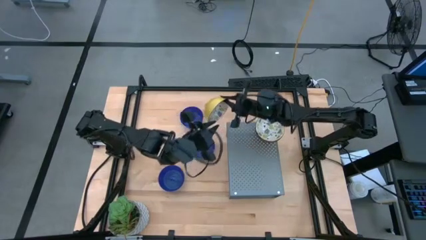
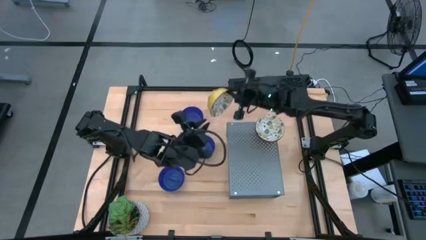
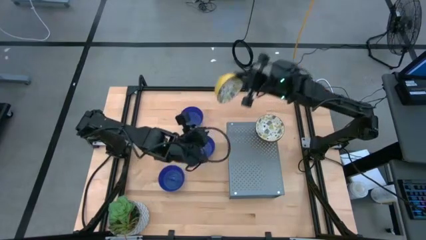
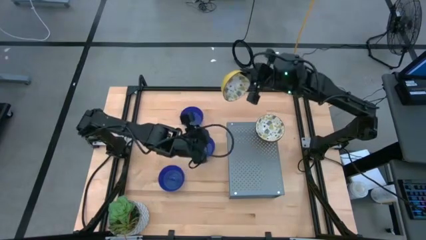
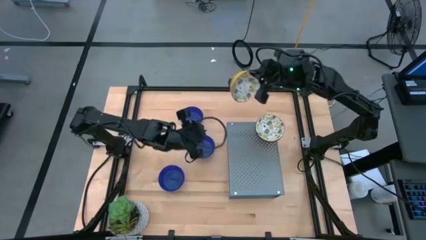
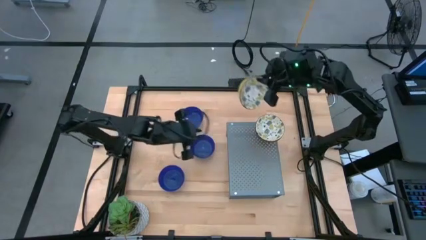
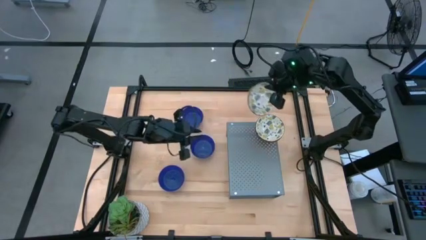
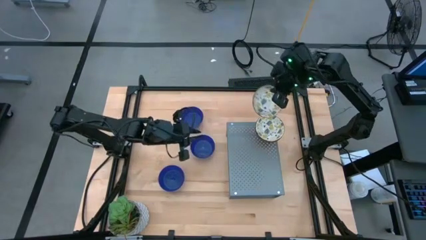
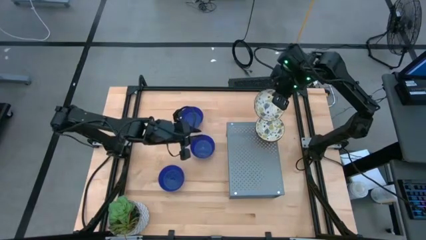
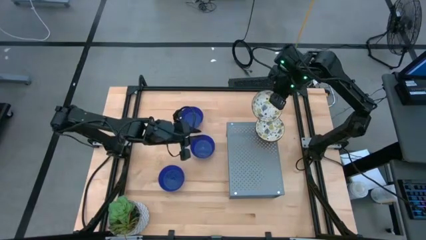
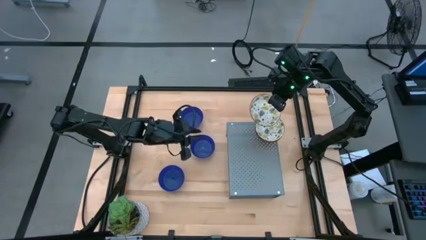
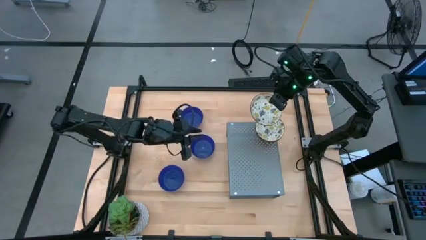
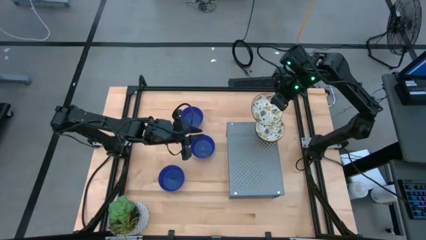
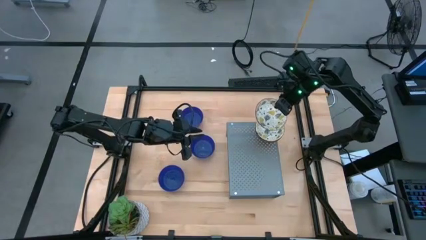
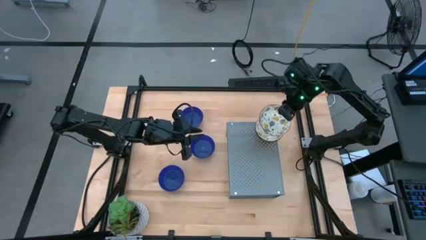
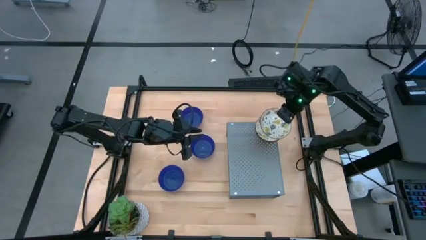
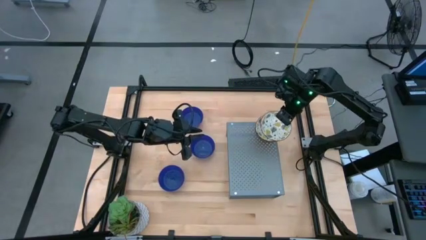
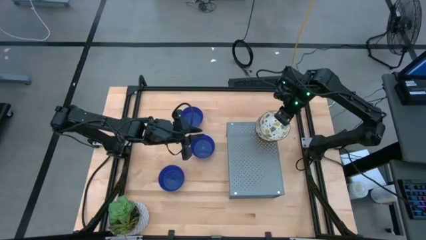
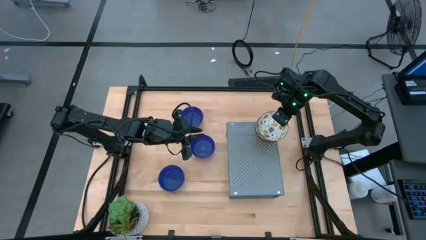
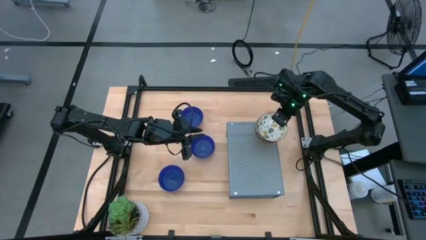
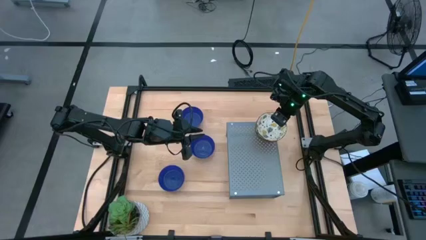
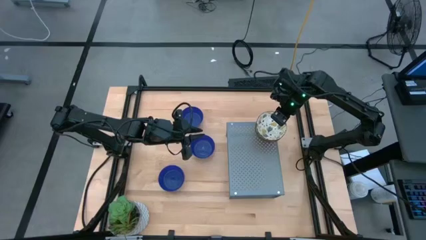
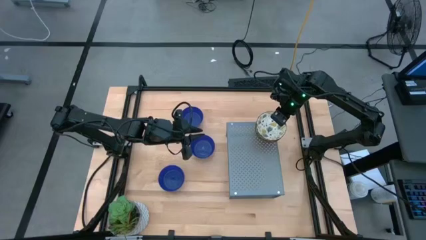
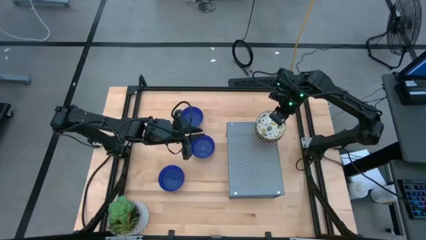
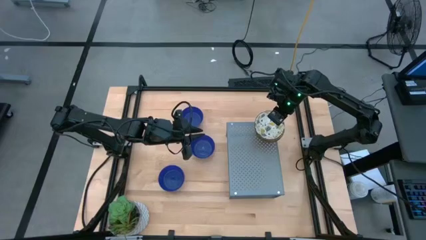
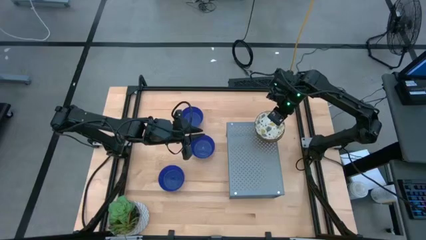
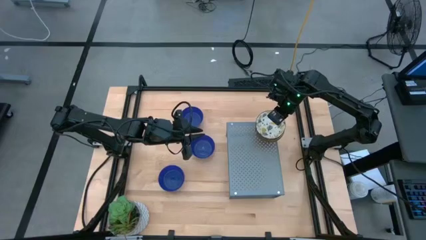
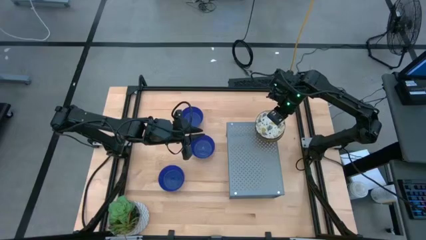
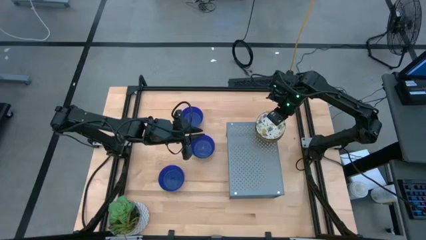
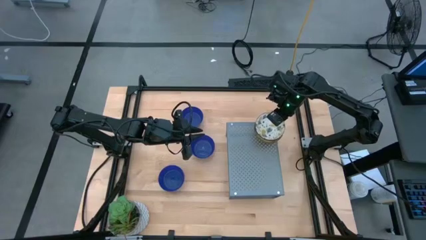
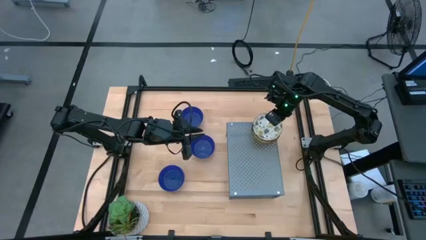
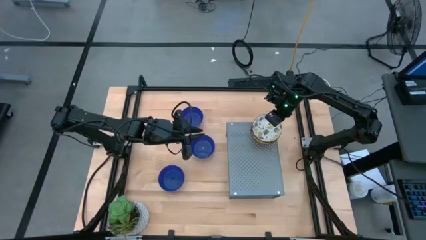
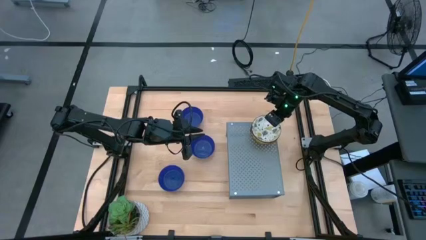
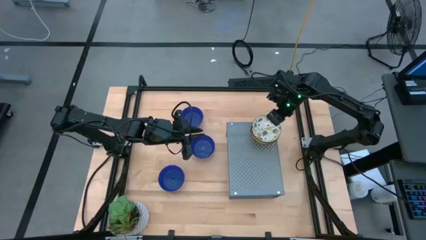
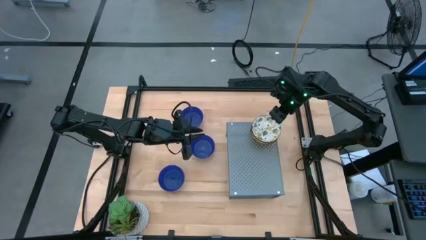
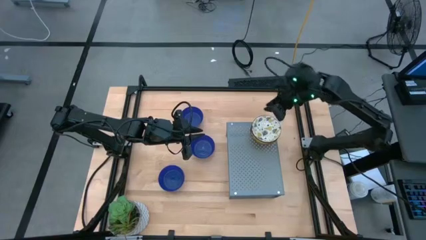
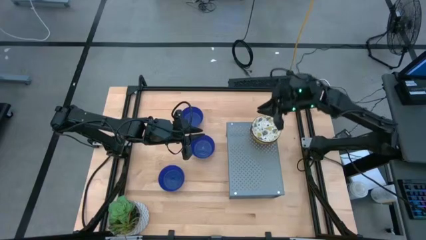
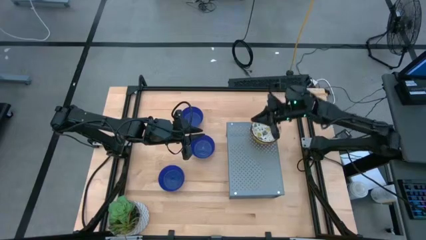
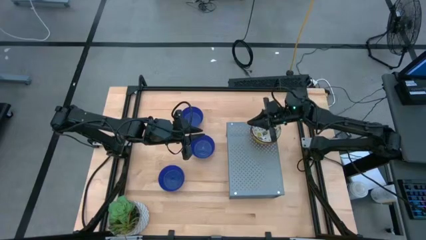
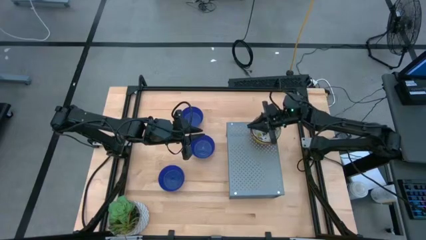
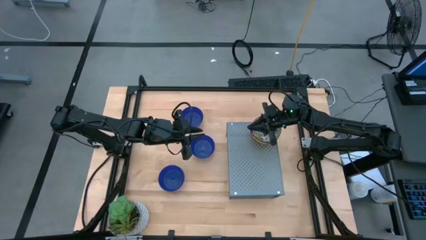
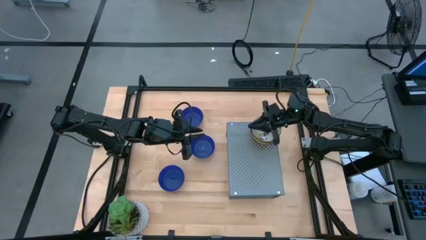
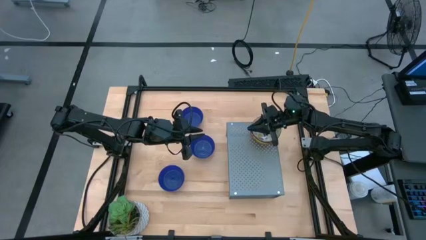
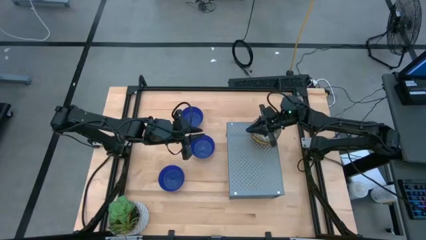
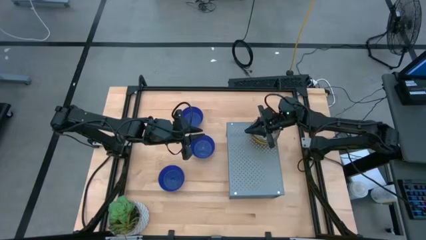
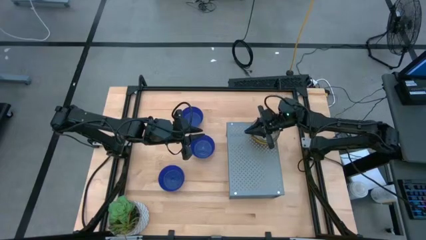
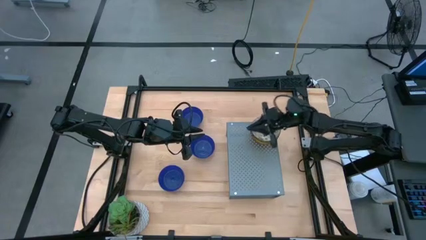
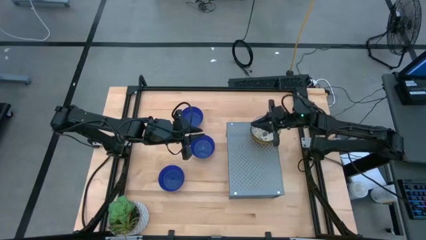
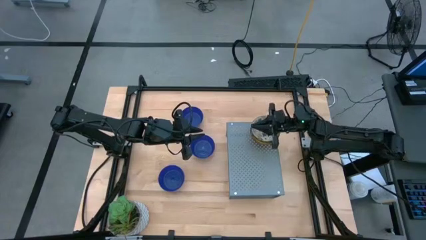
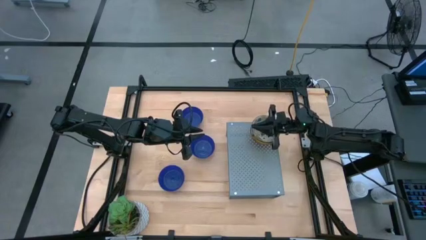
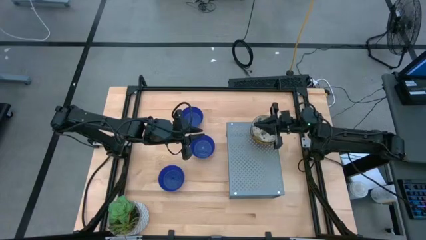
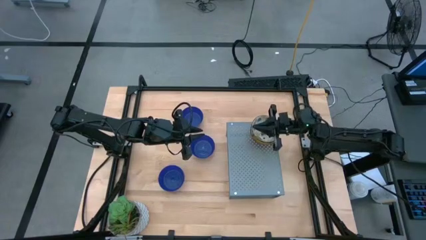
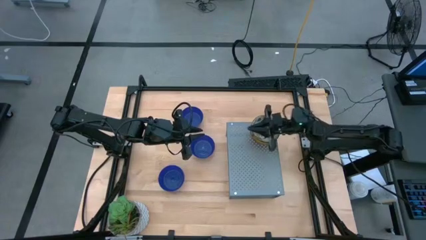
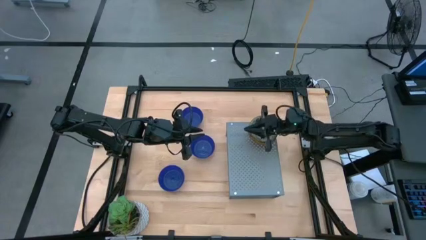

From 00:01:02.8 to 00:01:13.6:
Task: Pick & Place Mini bowls
Stack the yellow bowl on the yellow bowl on the shelf

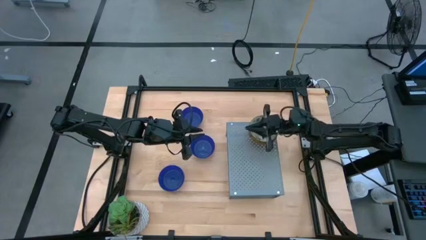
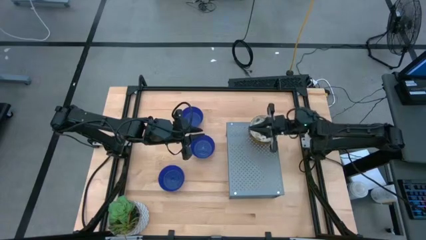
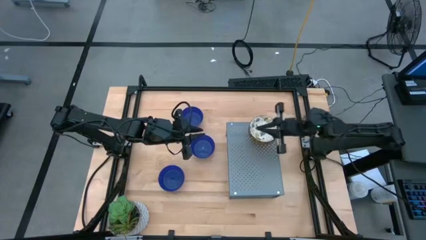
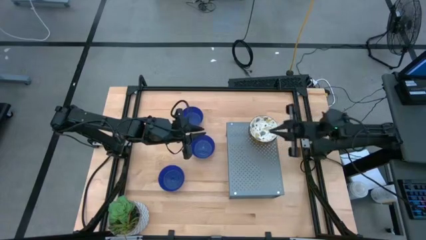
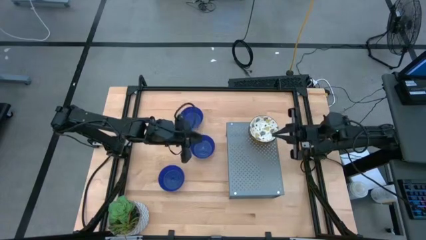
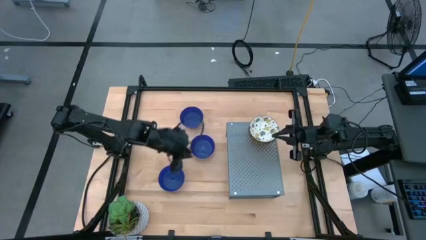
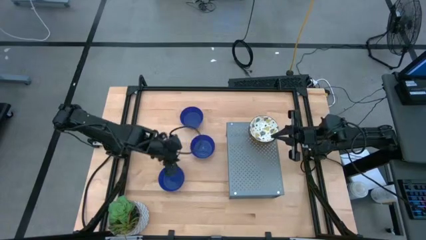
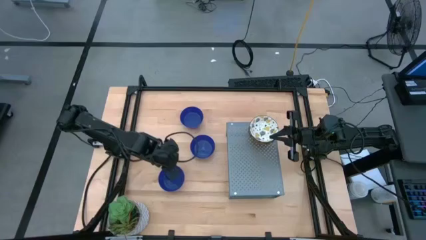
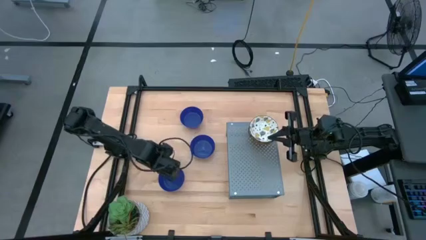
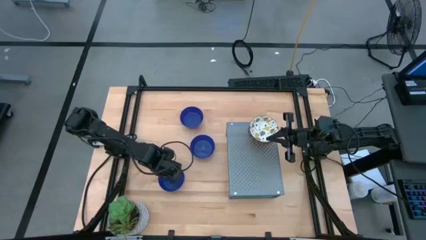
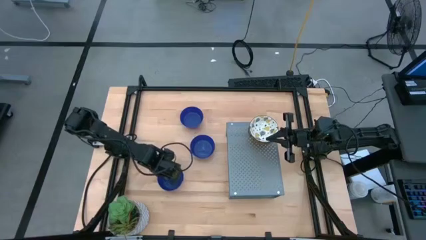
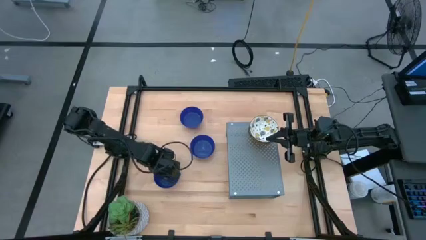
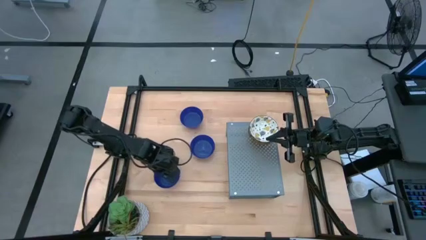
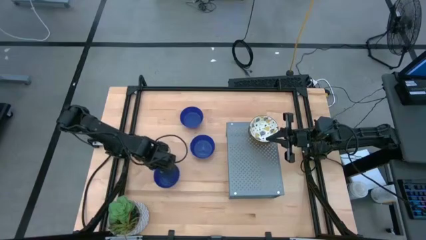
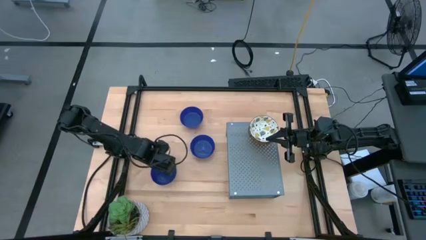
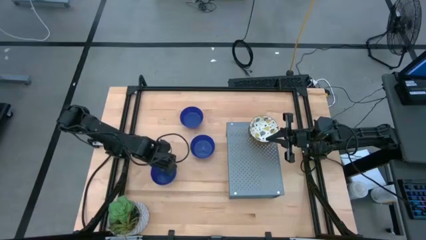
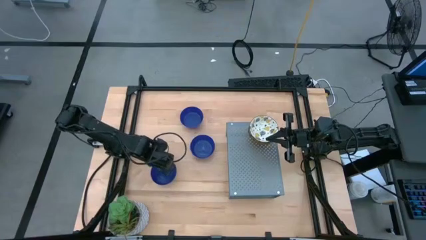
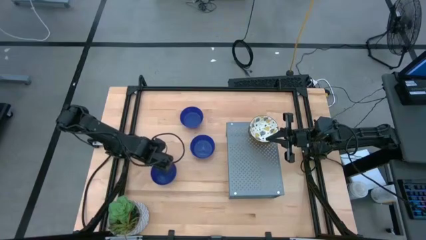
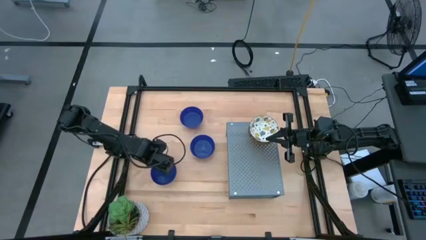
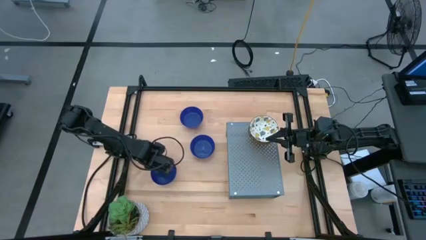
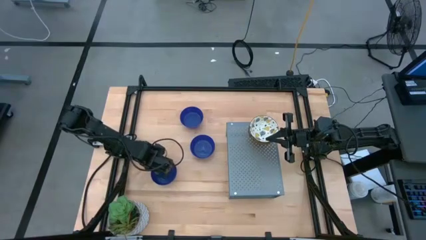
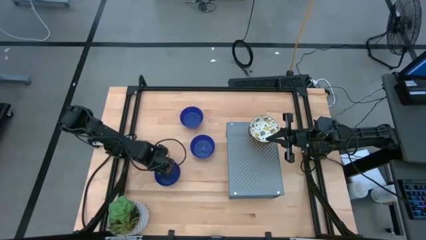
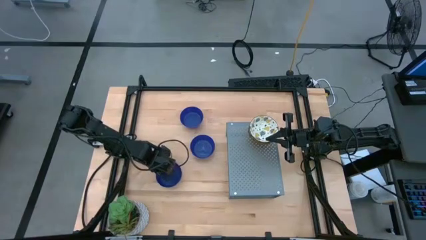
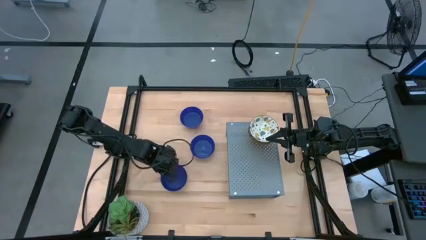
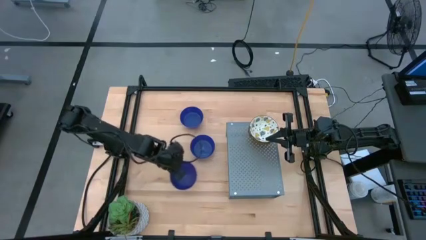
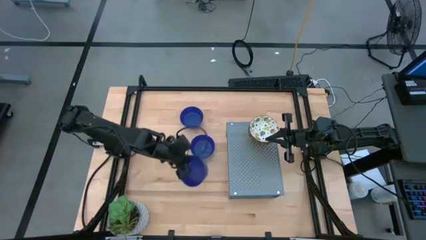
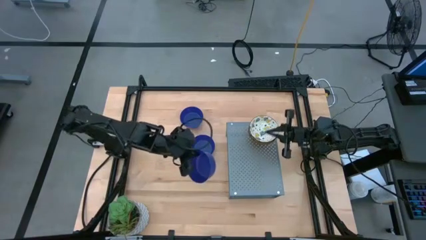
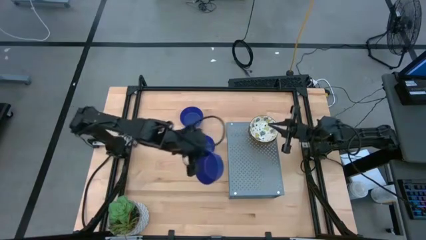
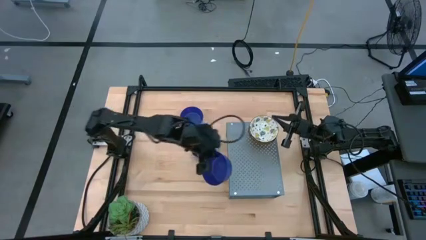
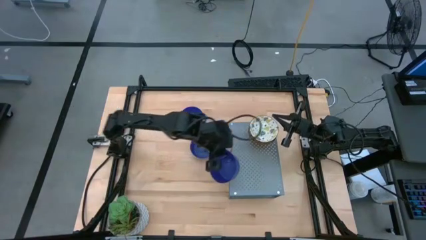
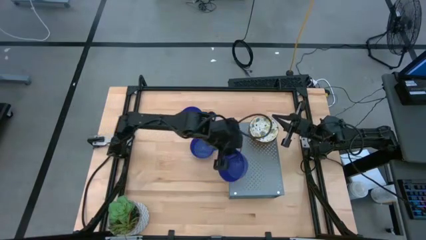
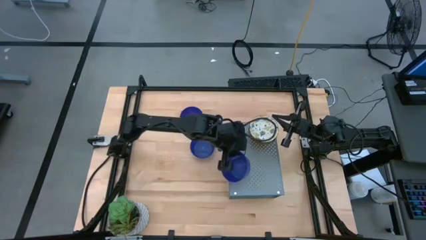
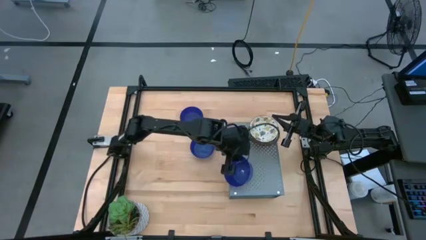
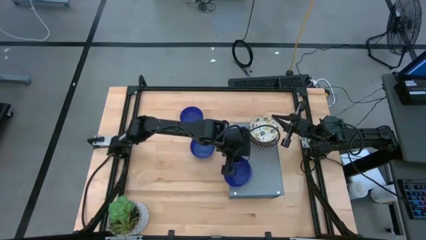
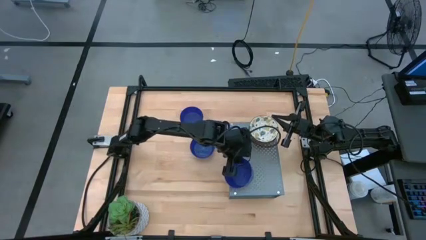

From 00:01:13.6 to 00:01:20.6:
Put the bottom left blue bowl on the shelf
